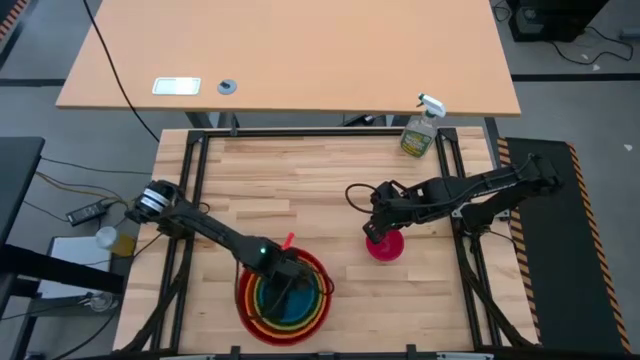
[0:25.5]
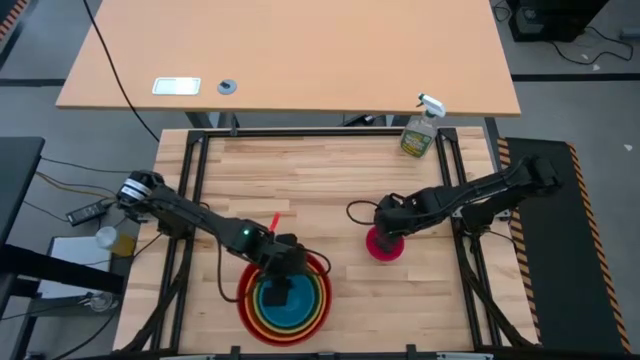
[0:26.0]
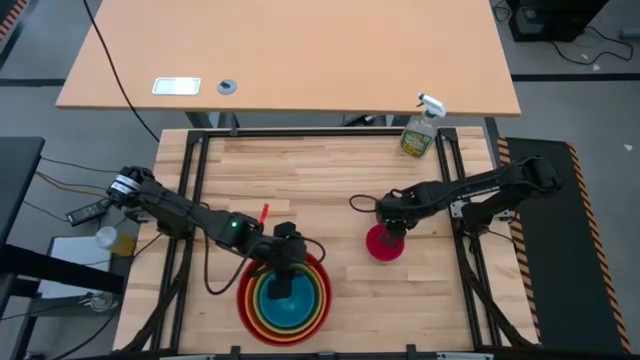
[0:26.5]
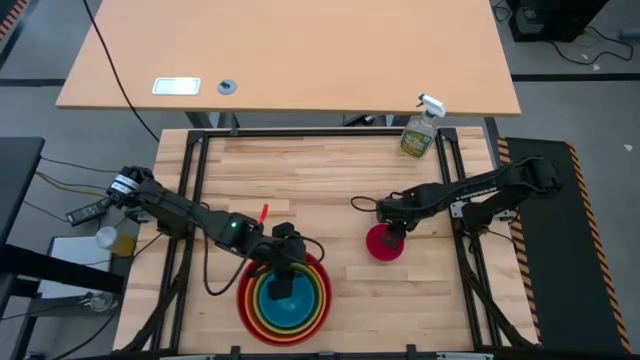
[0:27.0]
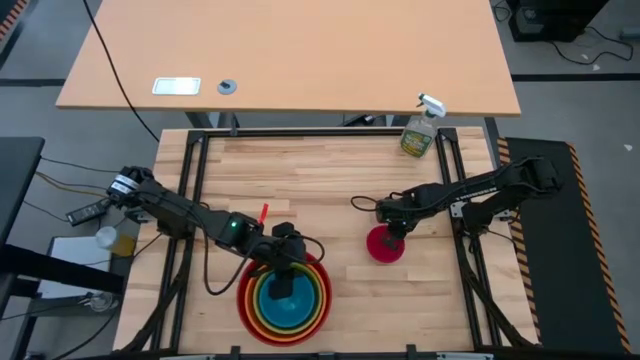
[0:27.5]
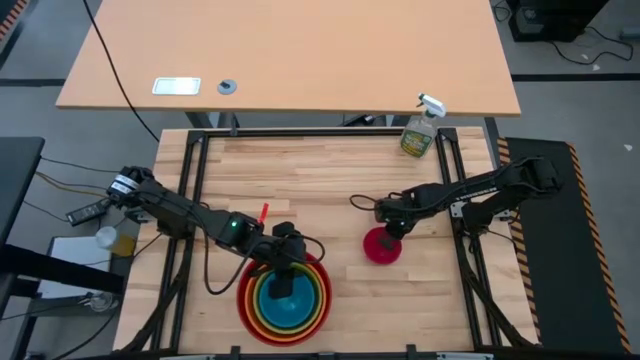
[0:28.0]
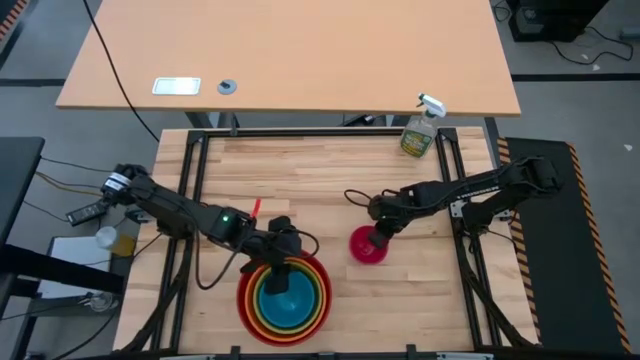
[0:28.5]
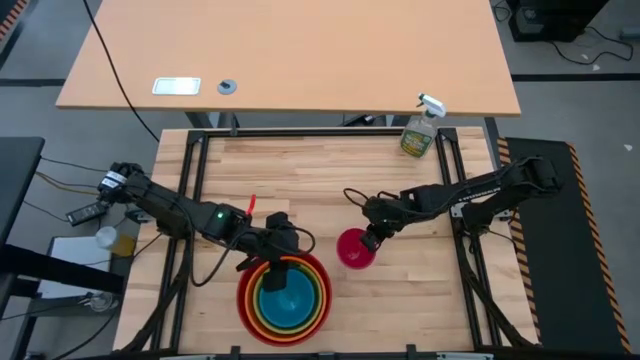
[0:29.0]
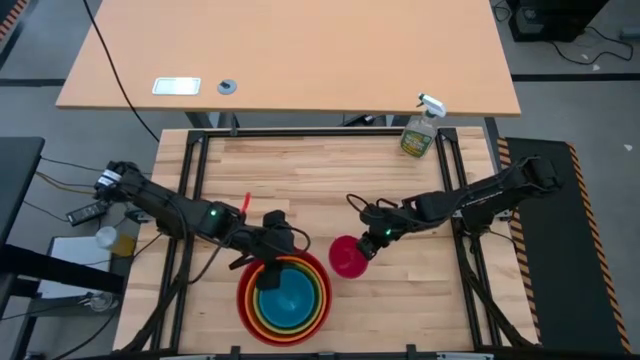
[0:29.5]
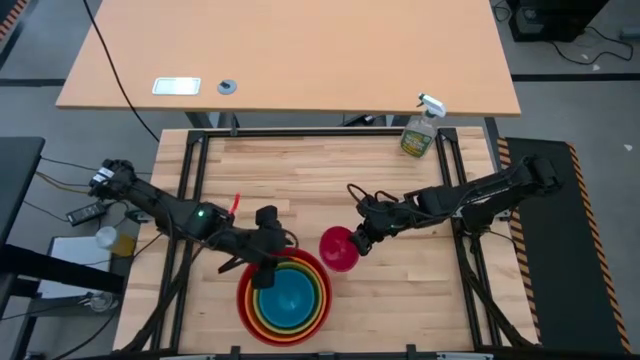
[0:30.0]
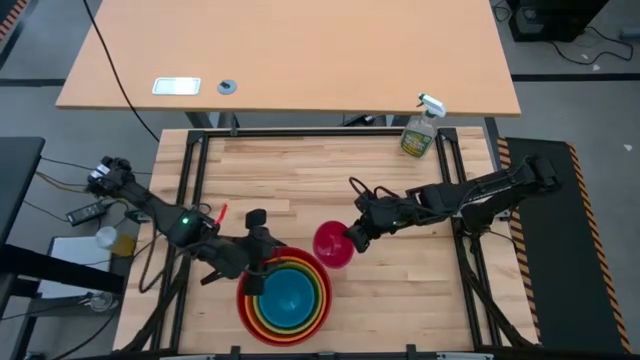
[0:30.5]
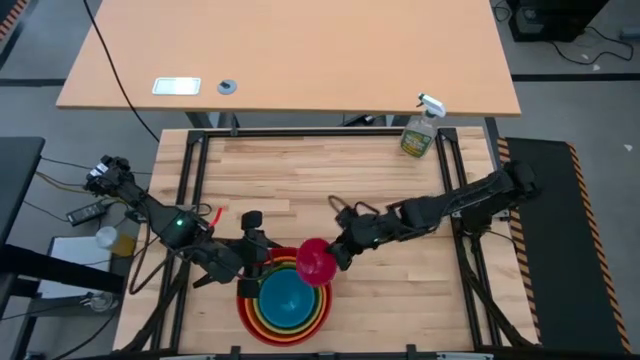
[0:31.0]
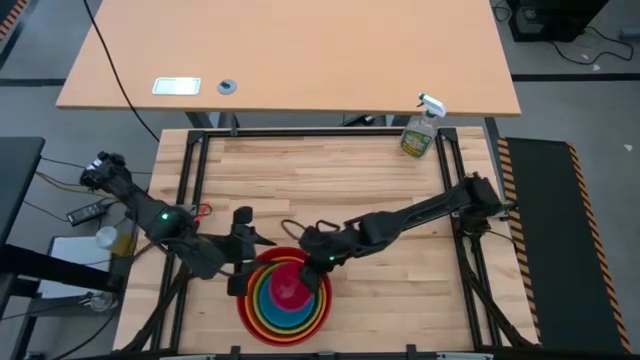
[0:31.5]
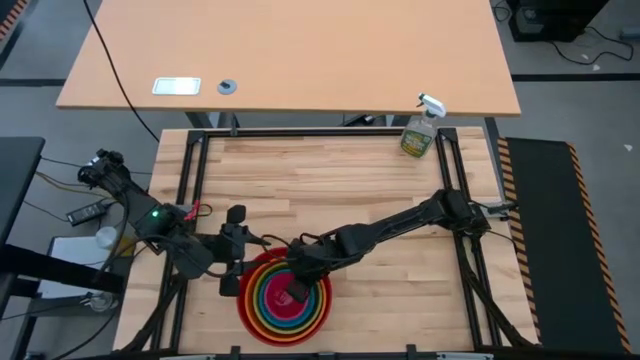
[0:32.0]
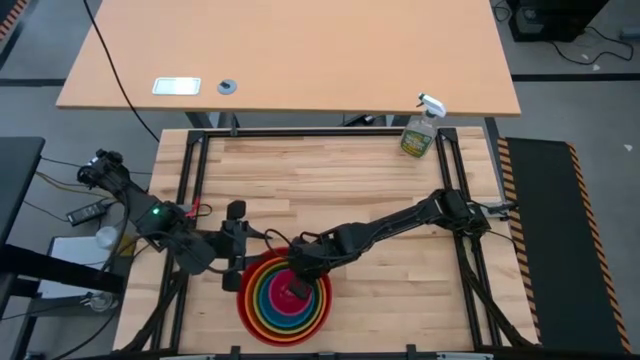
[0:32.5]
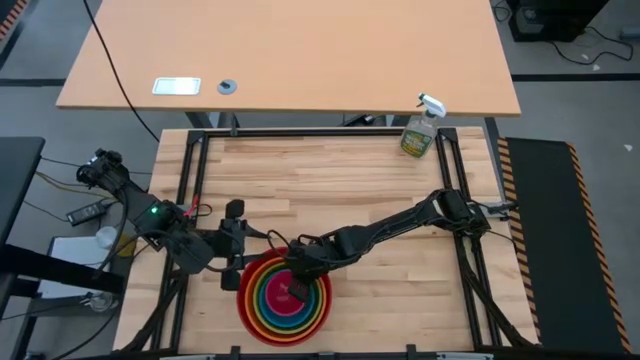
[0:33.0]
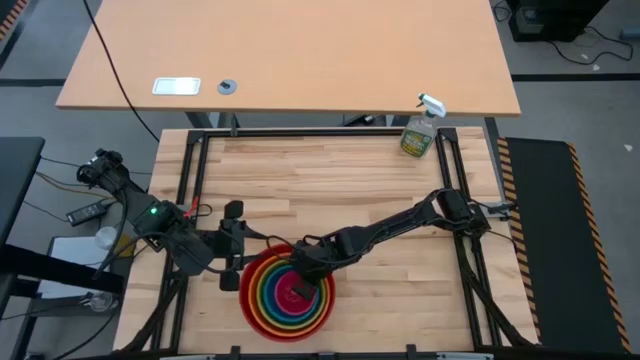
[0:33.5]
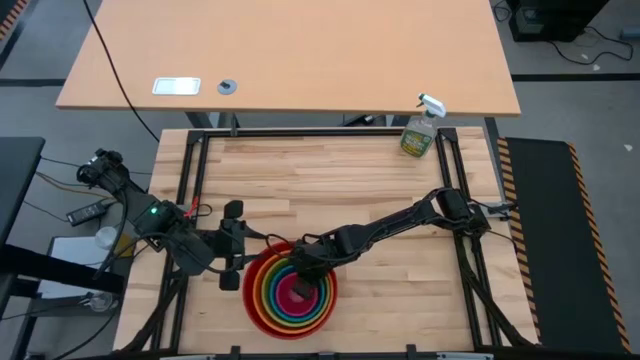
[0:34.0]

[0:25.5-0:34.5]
Stack the pink bowl on top of the blue bowl

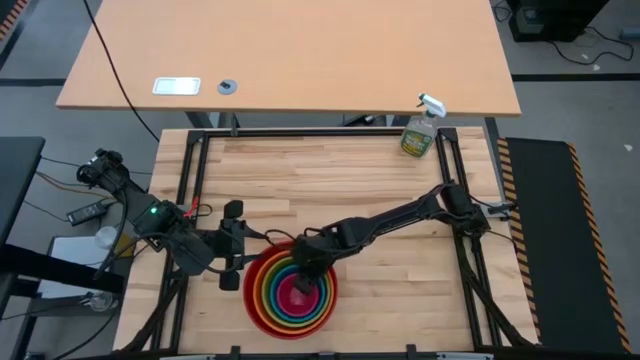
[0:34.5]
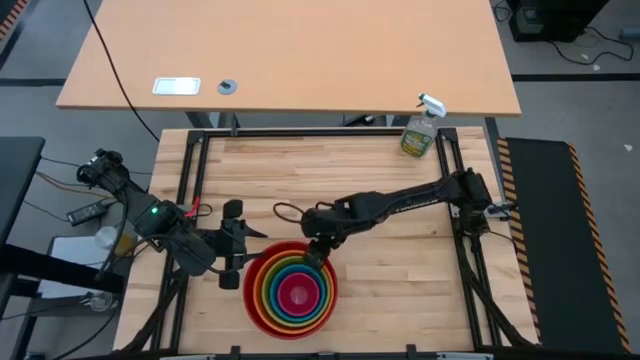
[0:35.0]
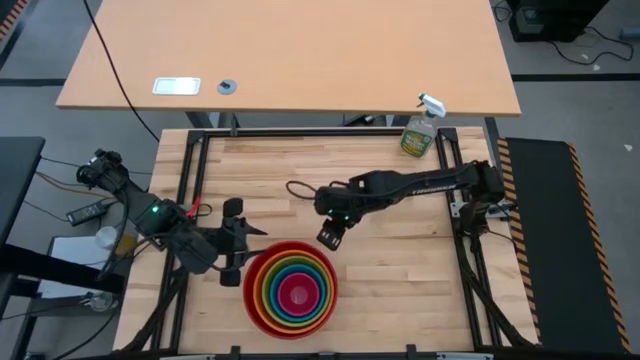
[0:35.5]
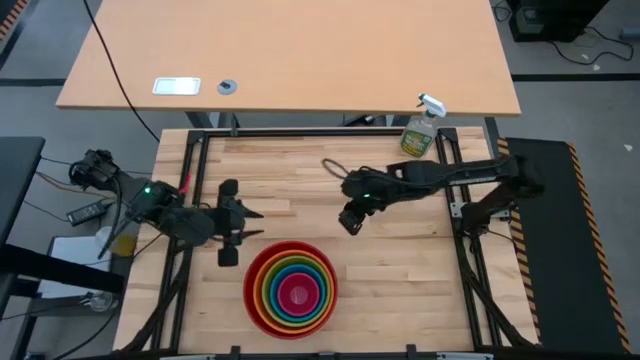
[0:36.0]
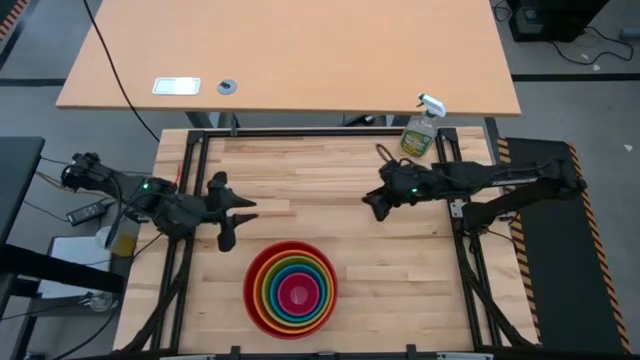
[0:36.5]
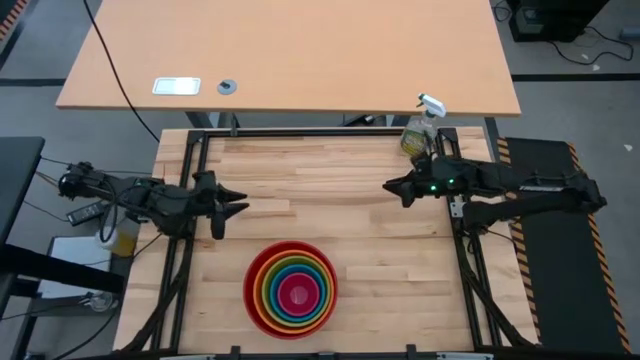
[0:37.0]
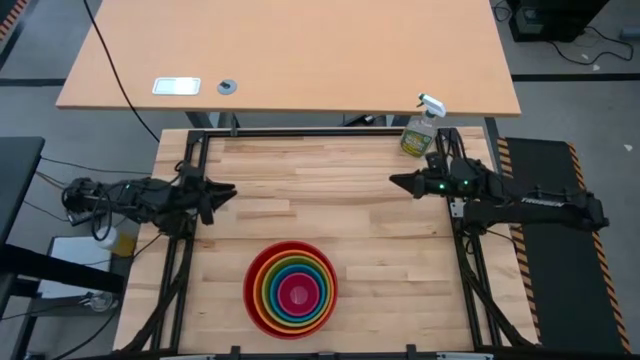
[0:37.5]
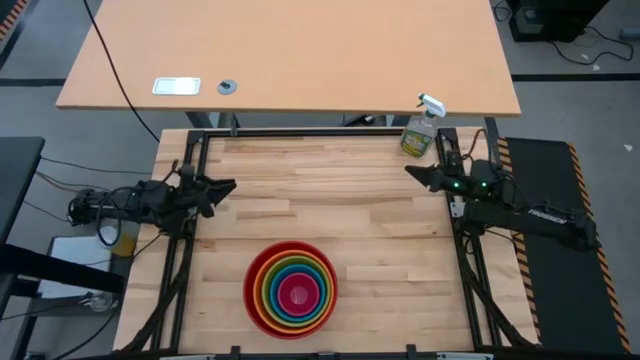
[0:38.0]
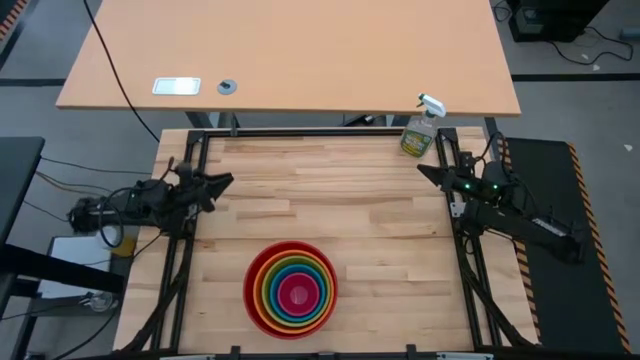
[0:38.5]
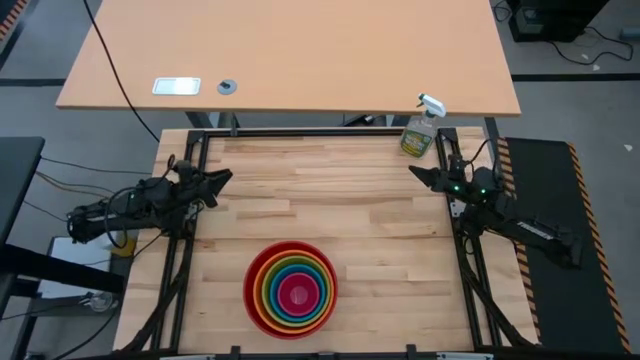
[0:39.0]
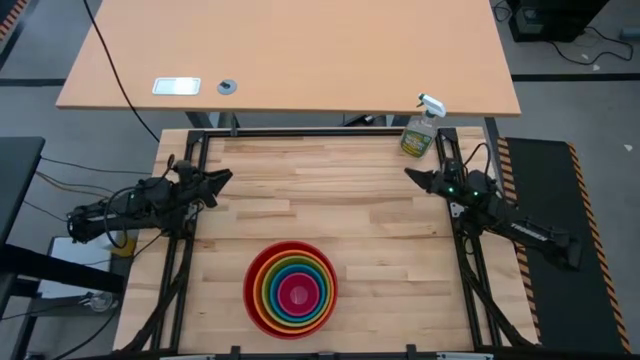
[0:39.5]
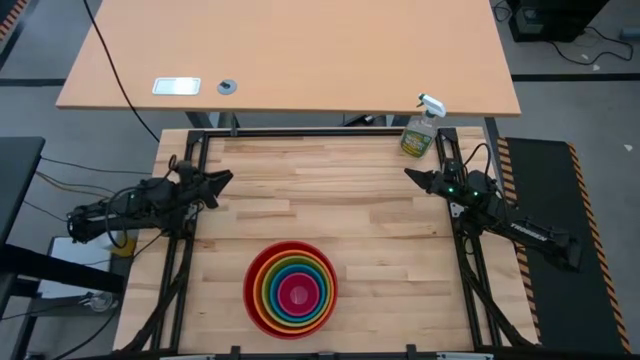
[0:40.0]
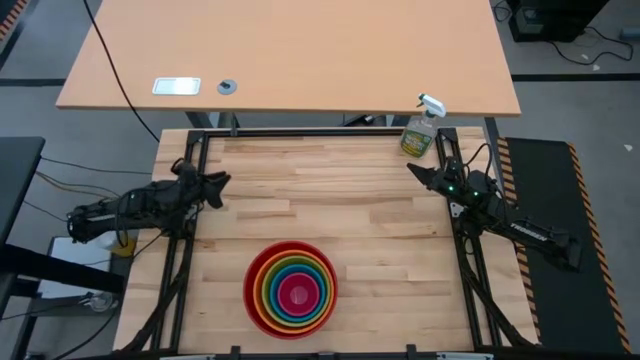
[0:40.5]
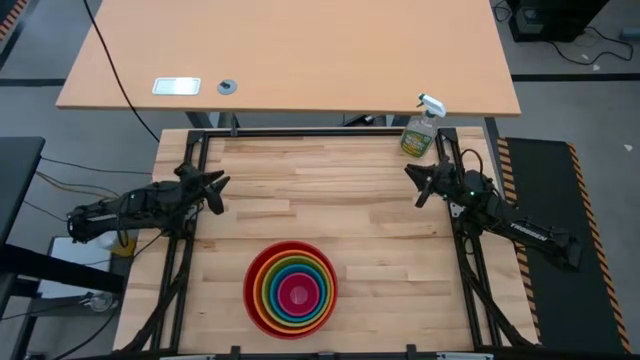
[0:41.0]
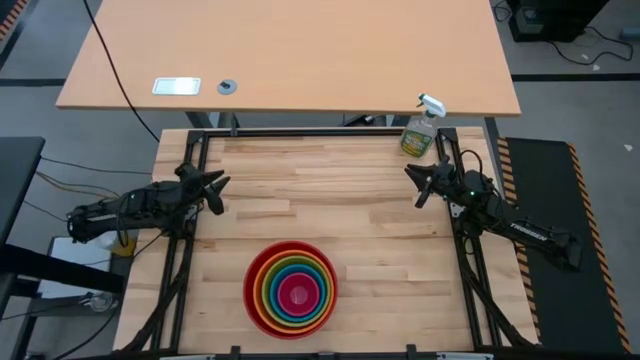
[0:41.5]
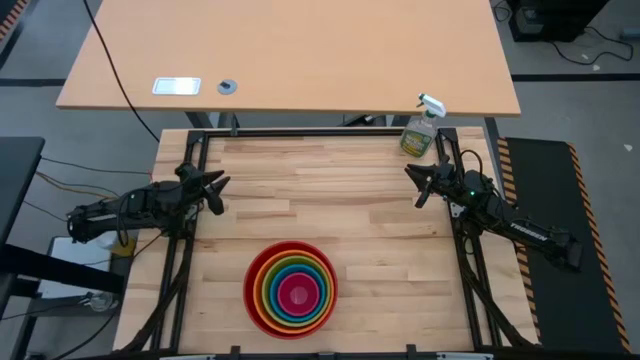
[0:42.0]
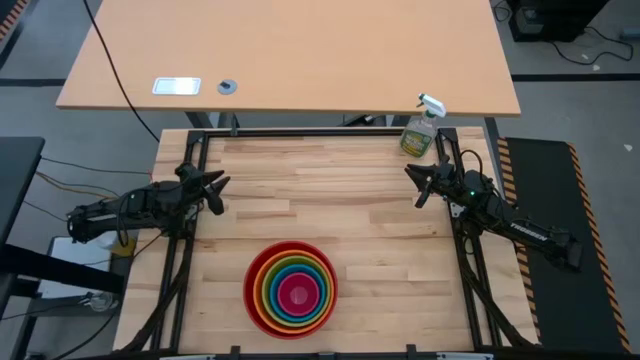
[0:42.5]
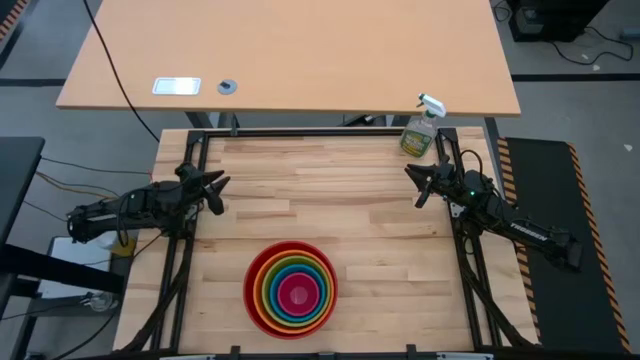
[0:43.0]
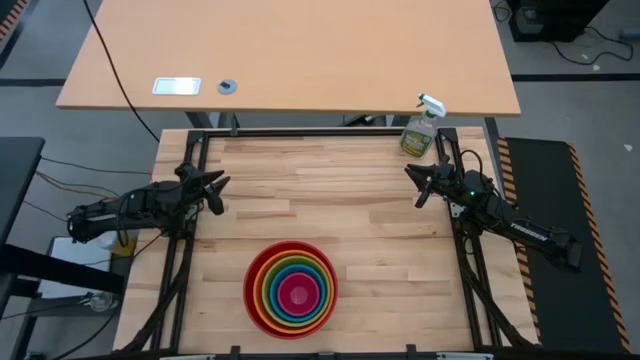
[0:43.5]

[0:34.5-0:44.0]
Return to Home Position
